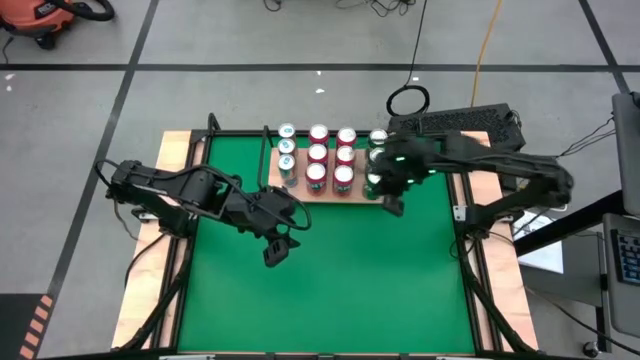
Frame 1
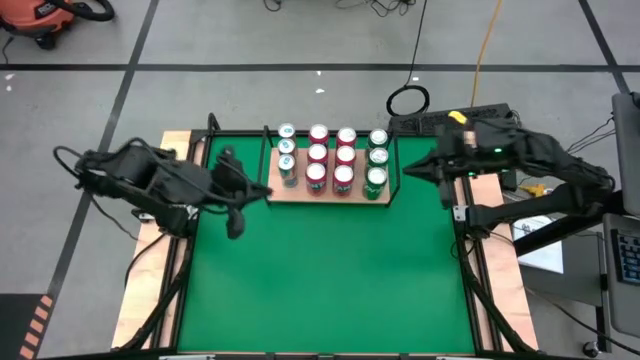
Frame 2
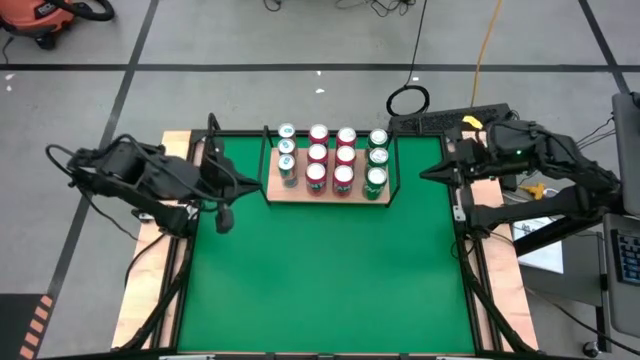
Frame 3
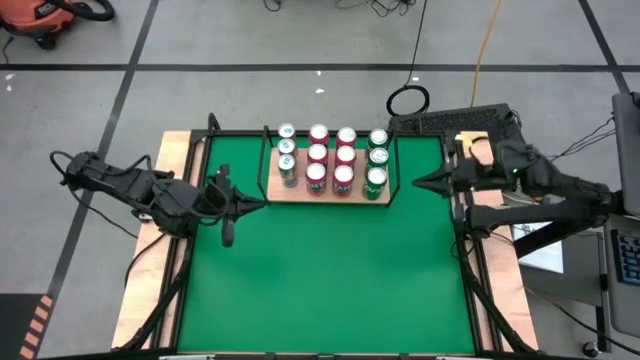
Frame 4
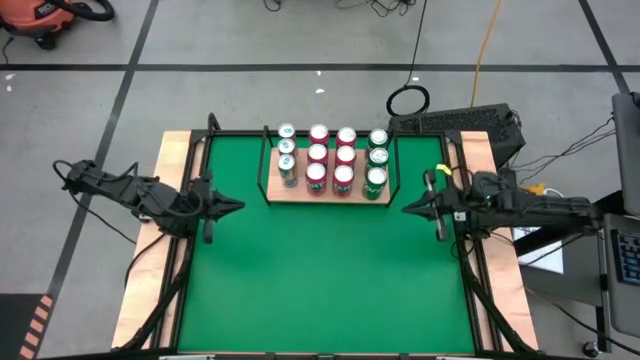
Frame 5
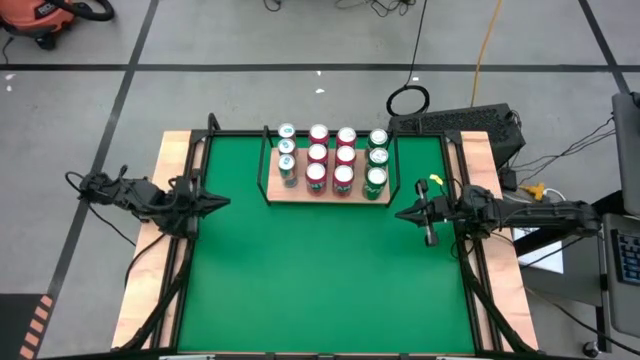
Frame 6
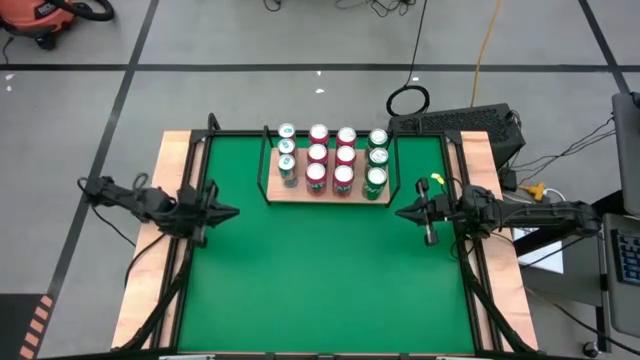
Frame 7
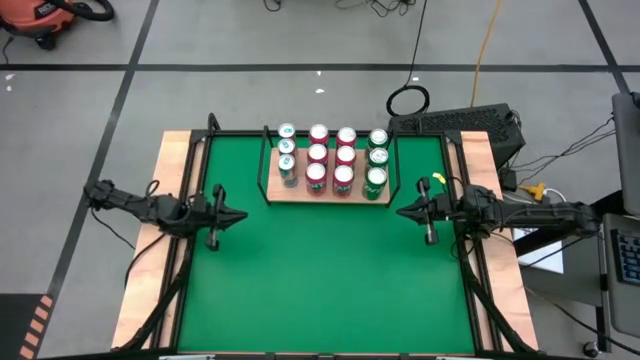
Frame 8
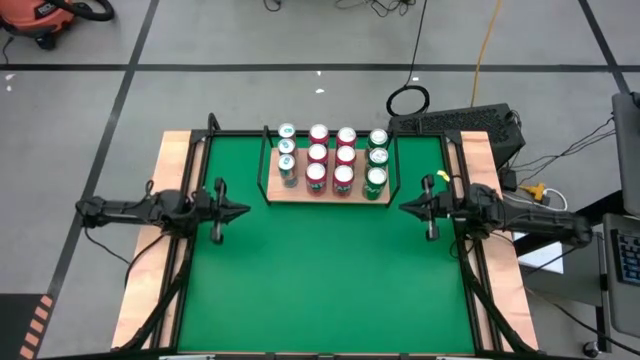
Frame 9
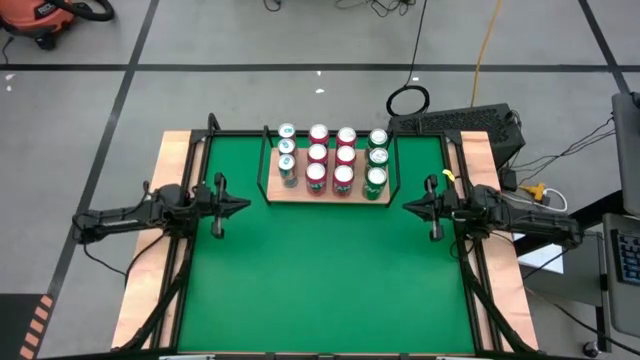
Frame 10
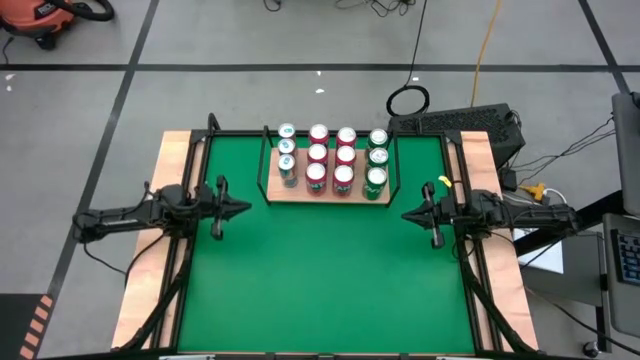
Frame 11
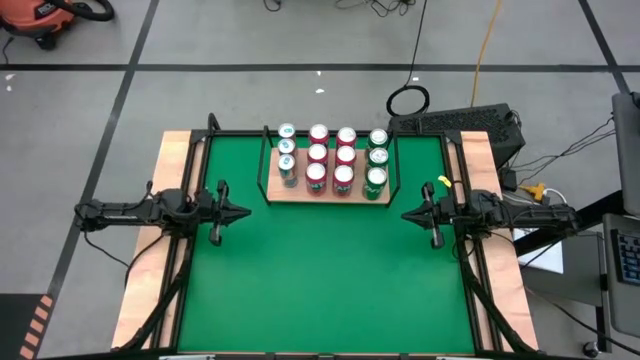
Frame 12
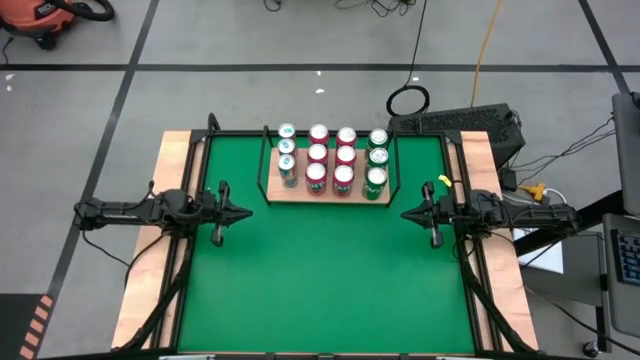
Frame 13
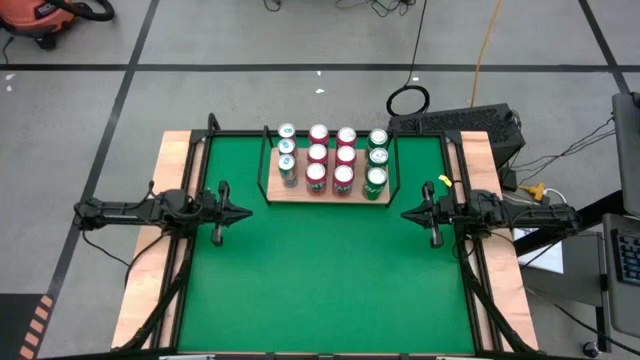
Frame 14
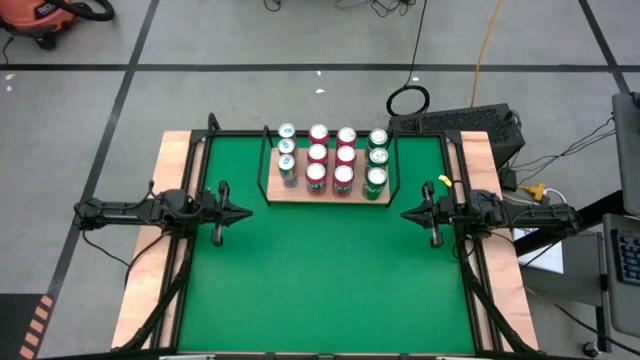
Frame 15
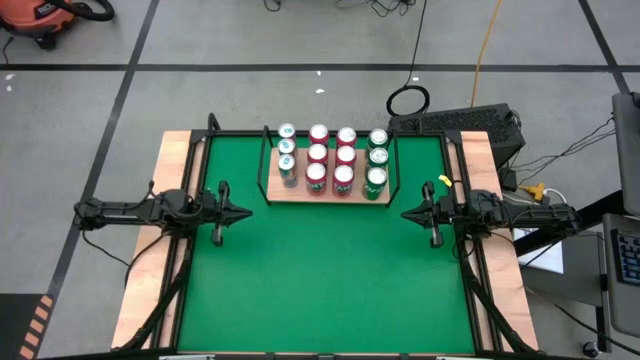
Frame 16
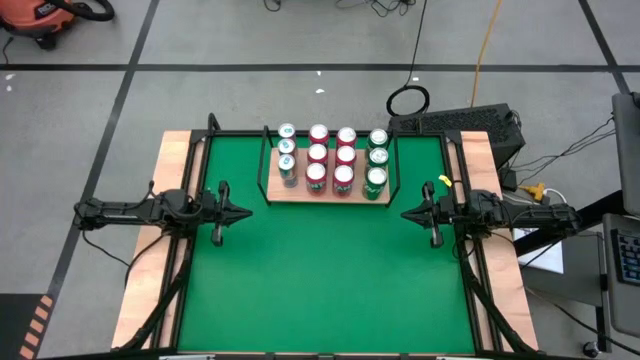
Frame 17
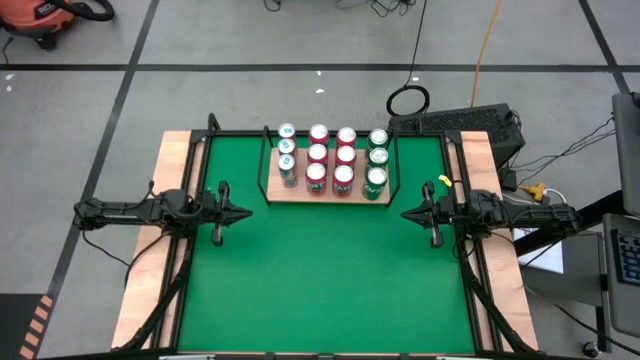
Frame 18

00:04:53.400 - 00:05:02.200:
Task: Place canned beverage on shelf
Return to Home Position

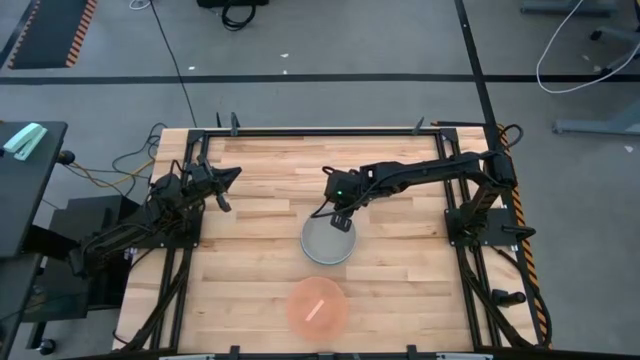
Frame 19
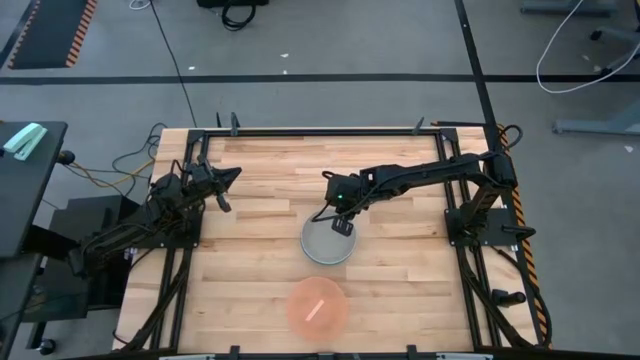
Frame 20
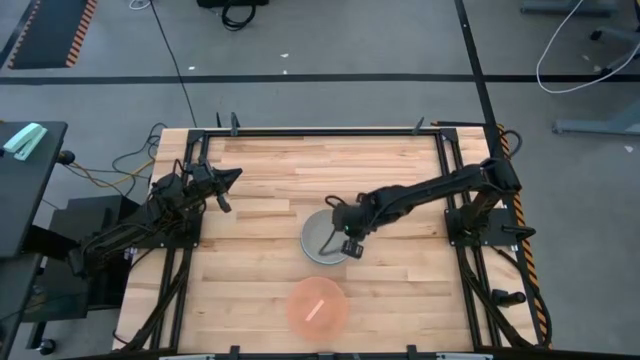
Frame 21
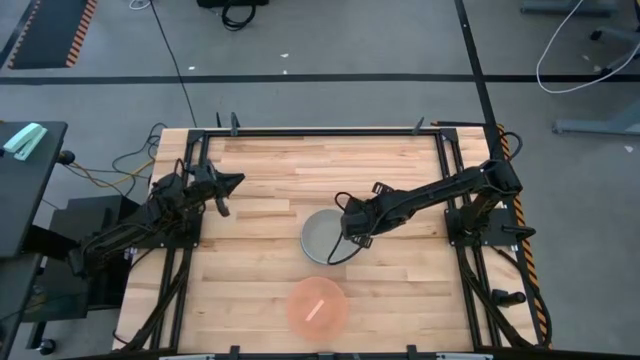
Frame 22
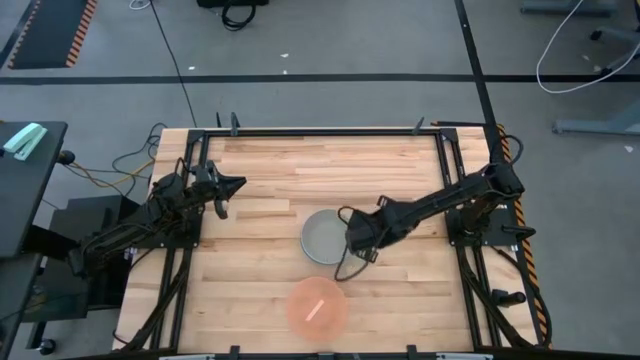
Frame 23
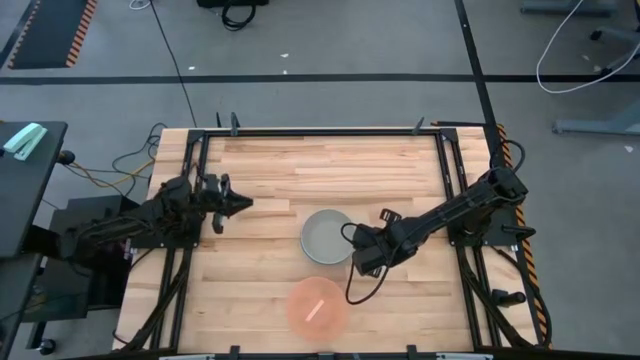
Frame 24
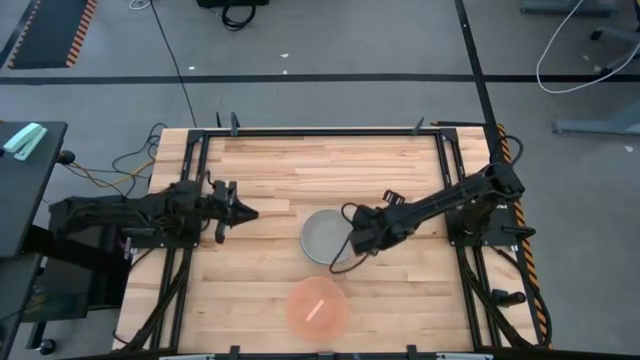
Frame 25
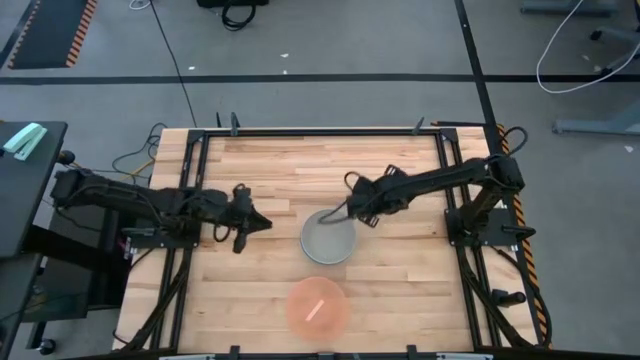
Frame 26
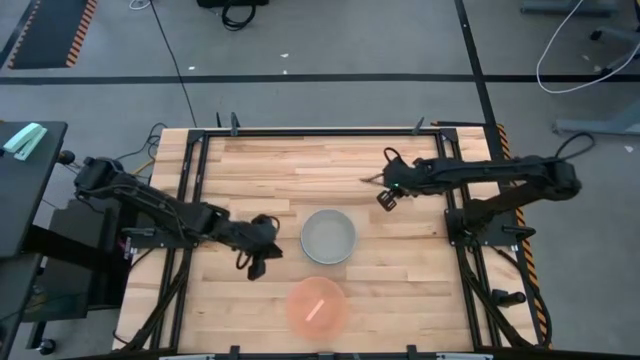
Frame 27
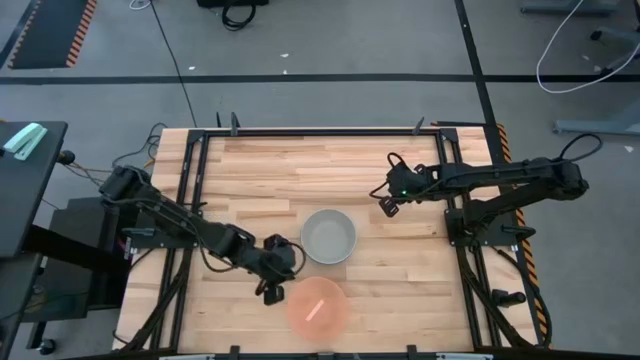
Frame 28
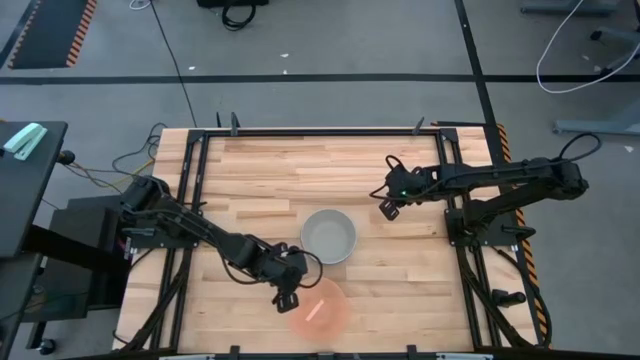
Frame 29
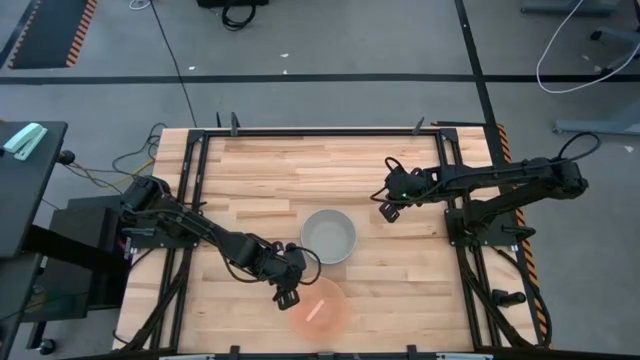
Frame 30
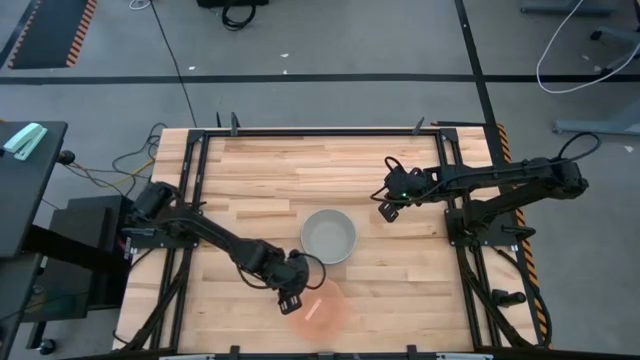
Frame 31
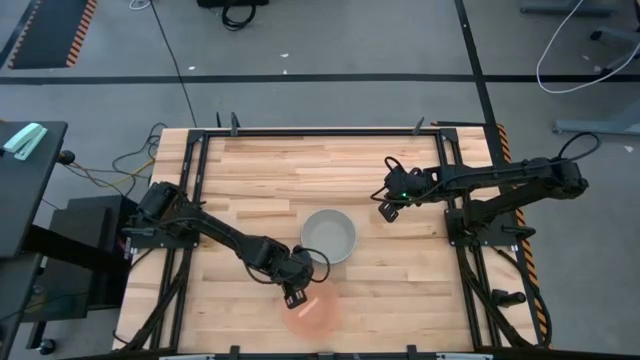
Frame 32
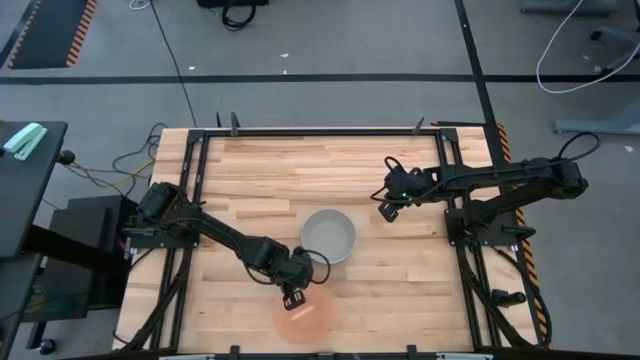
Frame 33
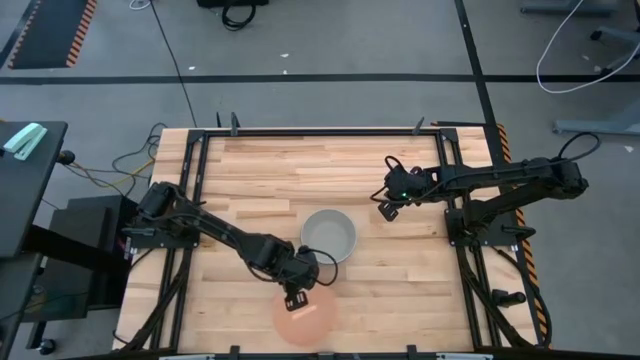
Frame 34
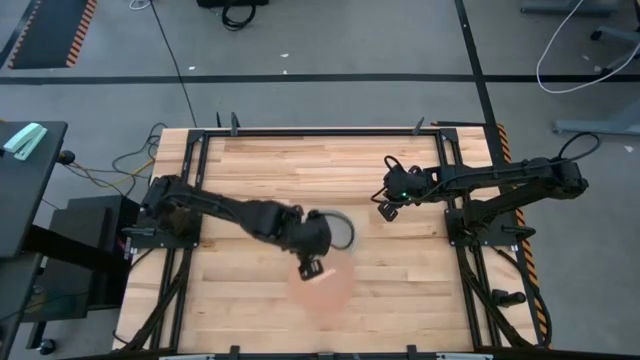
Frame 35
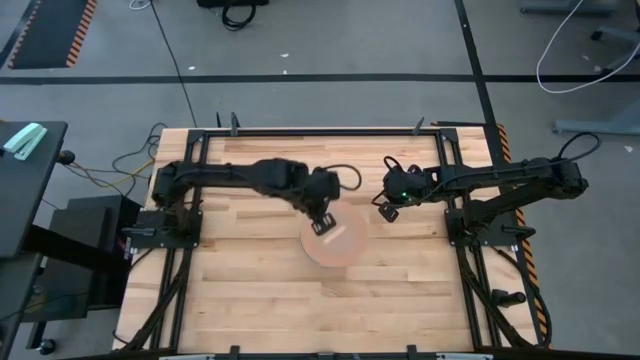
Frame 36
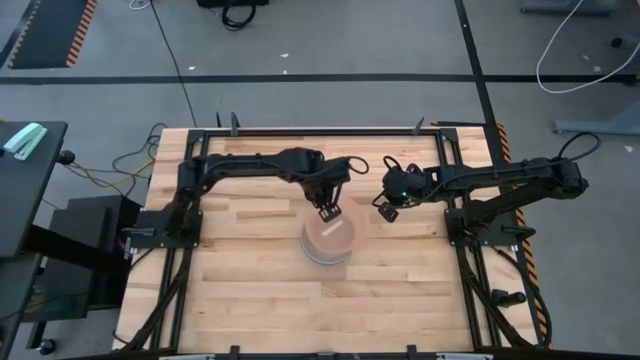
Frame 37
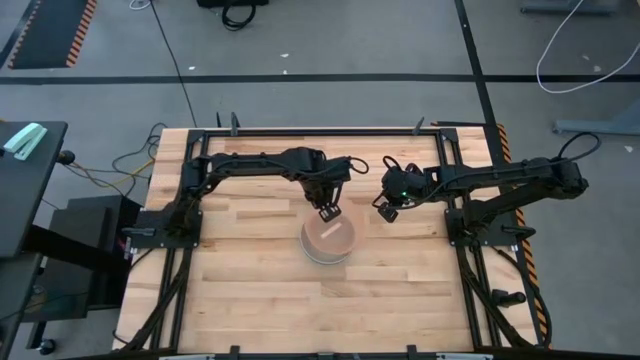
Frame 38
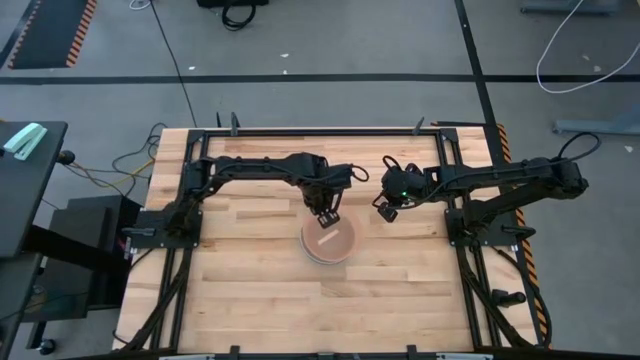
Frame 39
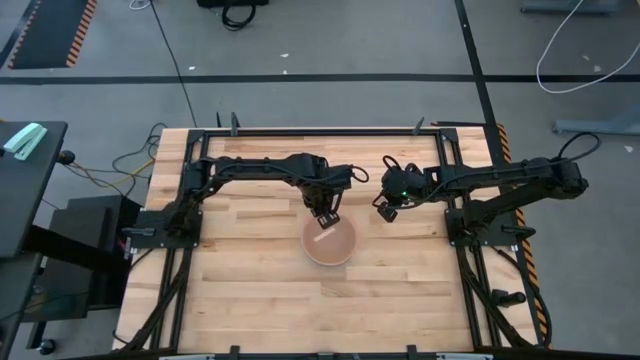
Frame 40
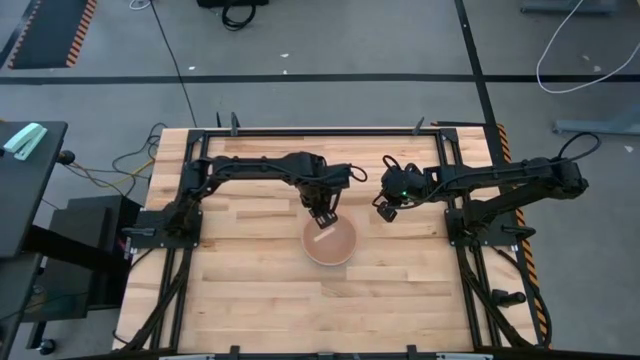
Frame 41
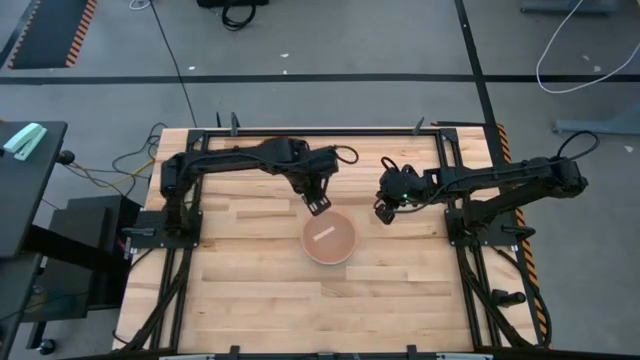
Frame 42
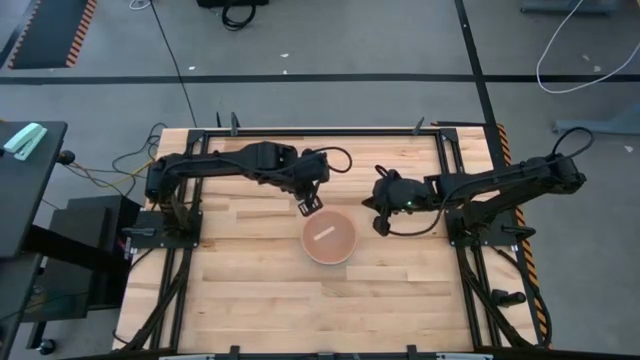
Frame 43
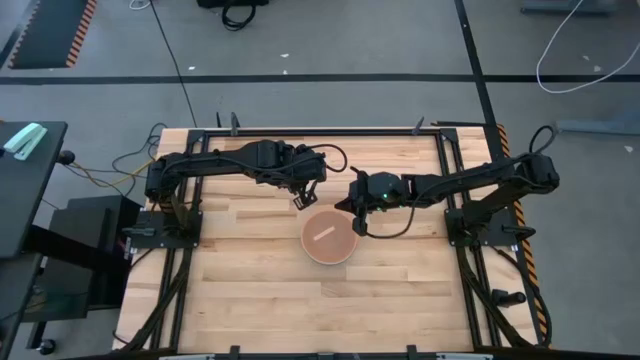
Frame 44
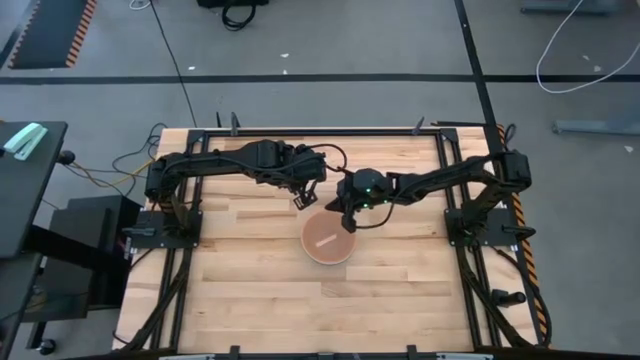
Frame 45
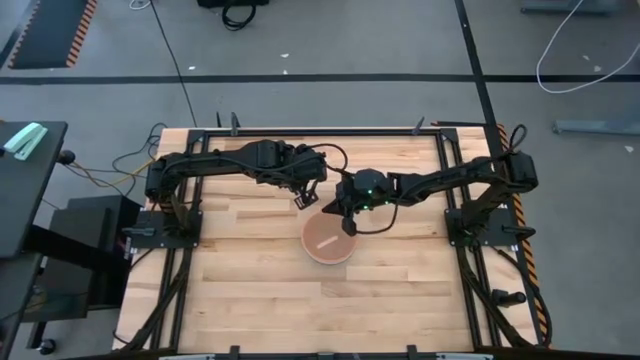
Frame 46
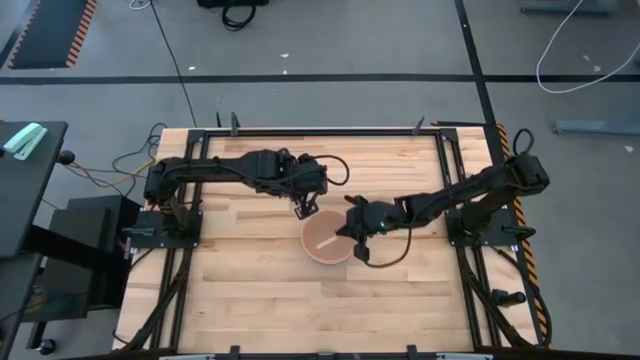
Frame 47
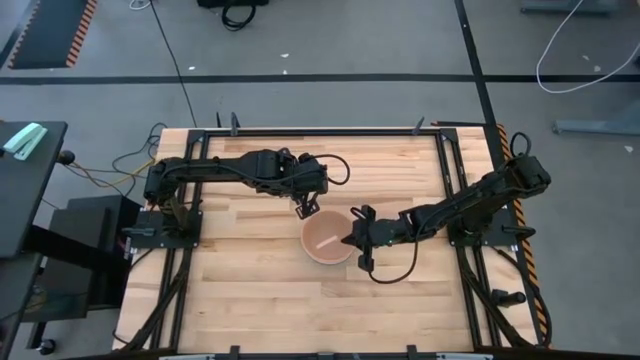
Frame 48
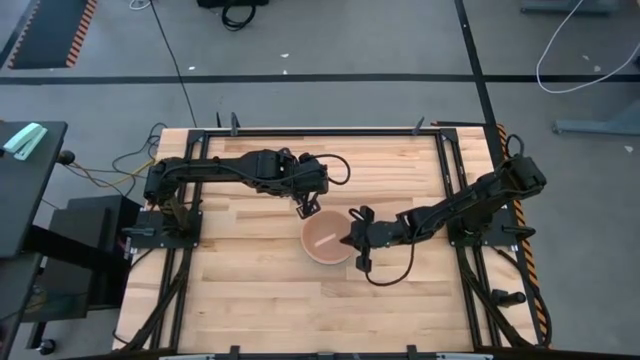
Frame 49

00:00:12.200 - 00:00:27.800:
Task: Nest bowls inside each other
Stack the orange bowl on the gray bowl
